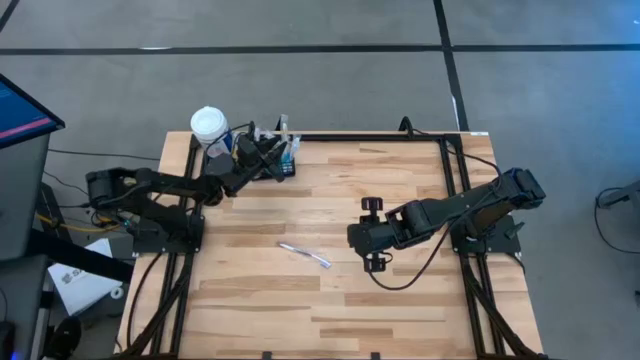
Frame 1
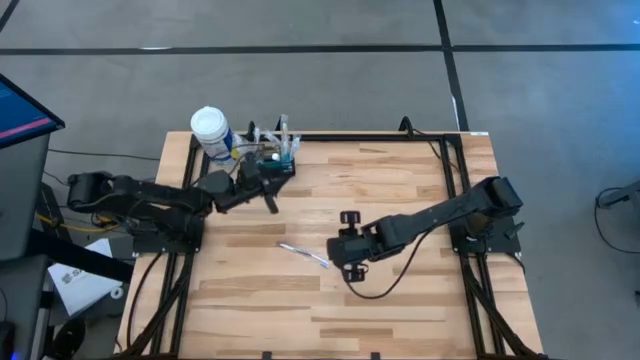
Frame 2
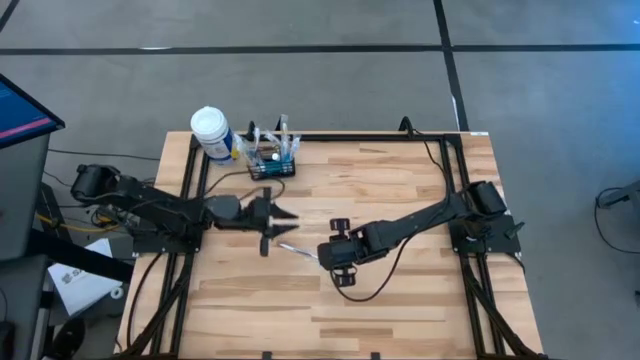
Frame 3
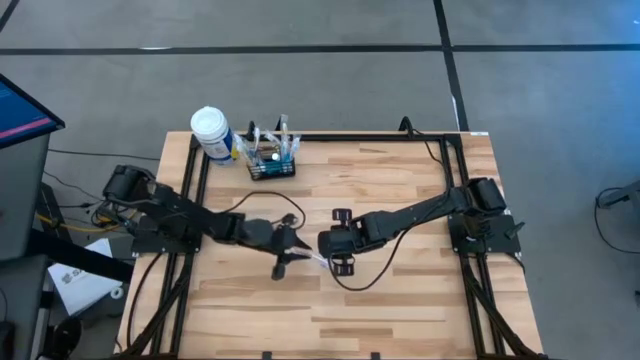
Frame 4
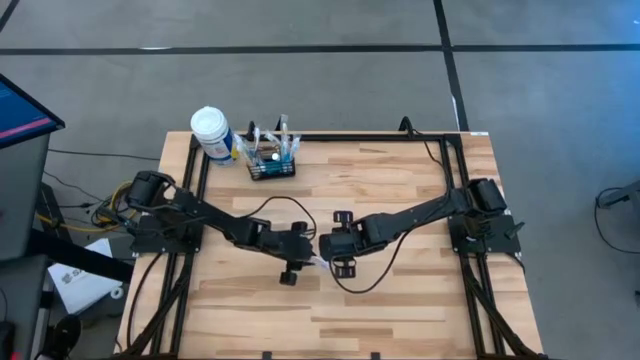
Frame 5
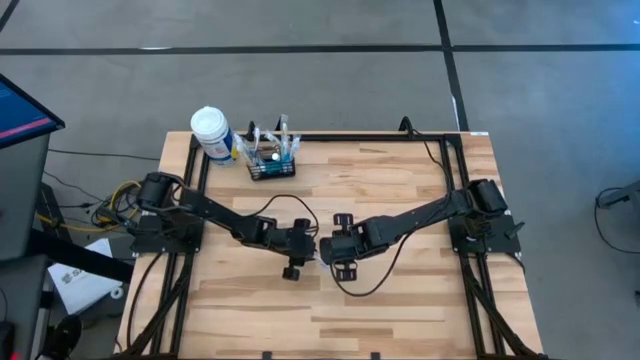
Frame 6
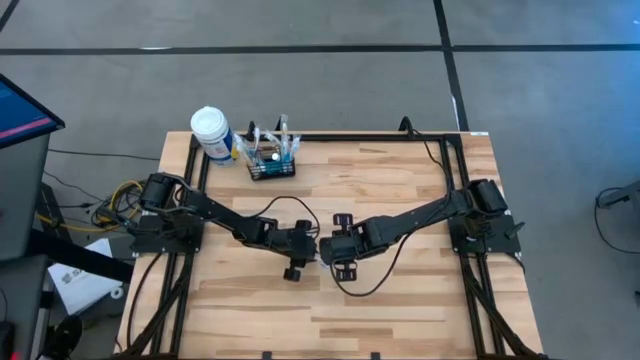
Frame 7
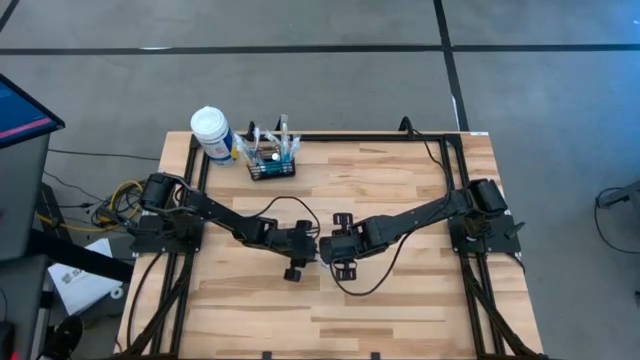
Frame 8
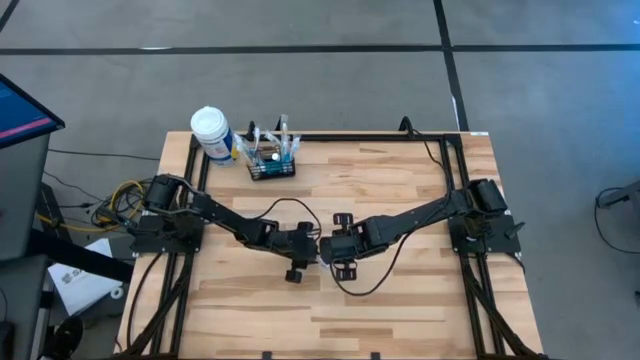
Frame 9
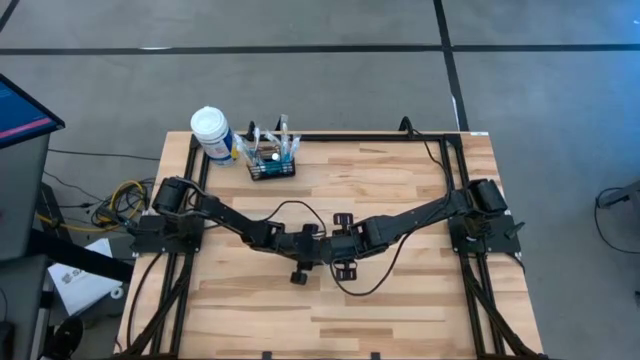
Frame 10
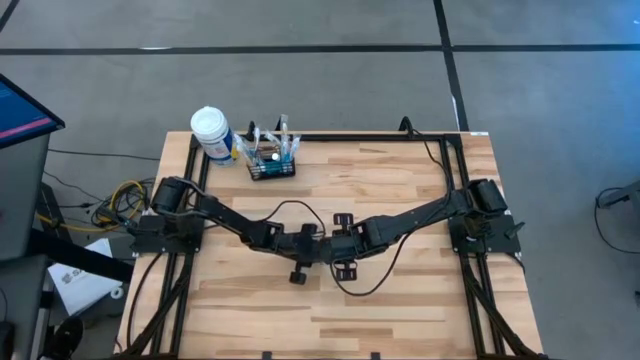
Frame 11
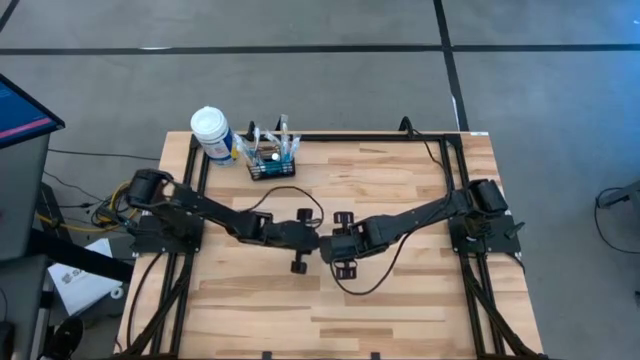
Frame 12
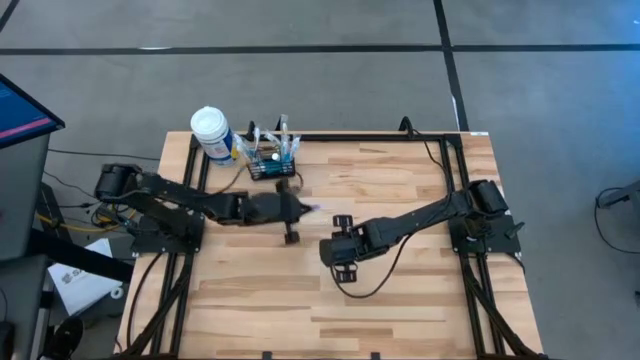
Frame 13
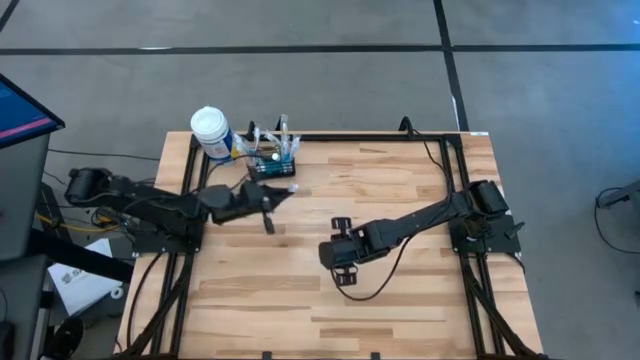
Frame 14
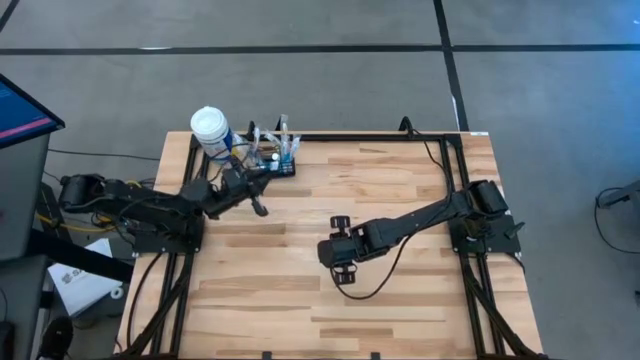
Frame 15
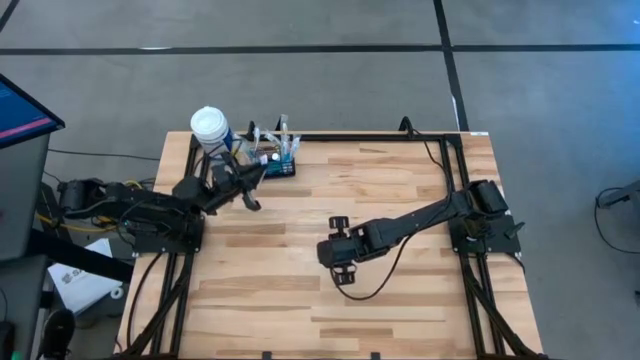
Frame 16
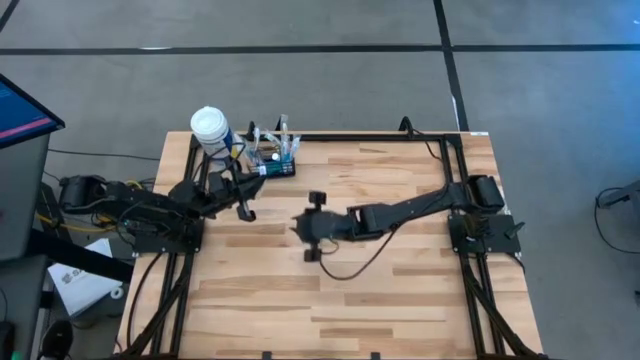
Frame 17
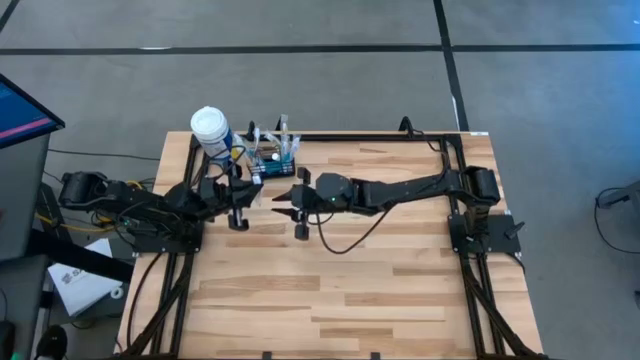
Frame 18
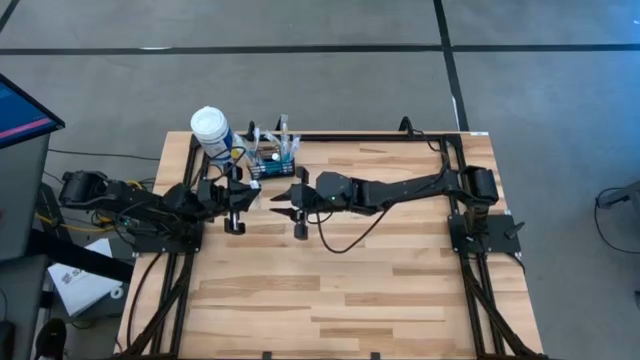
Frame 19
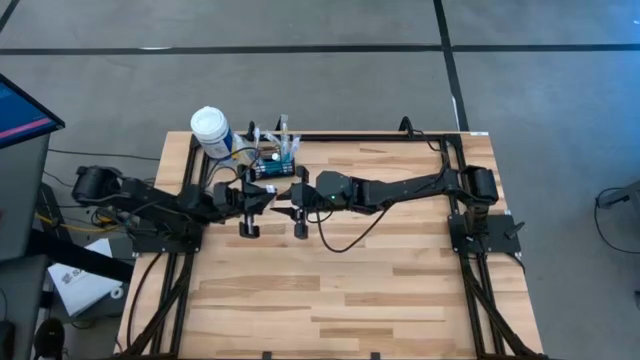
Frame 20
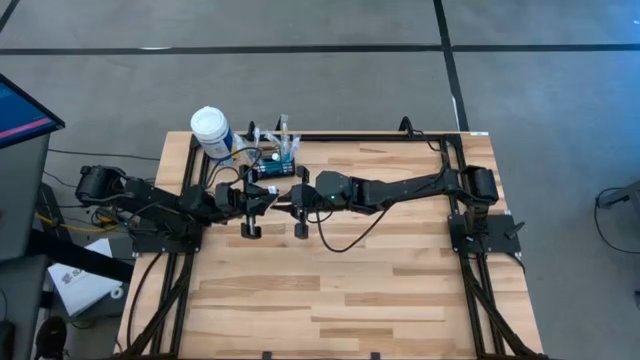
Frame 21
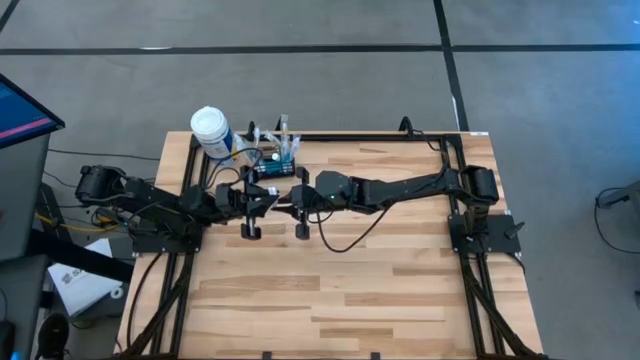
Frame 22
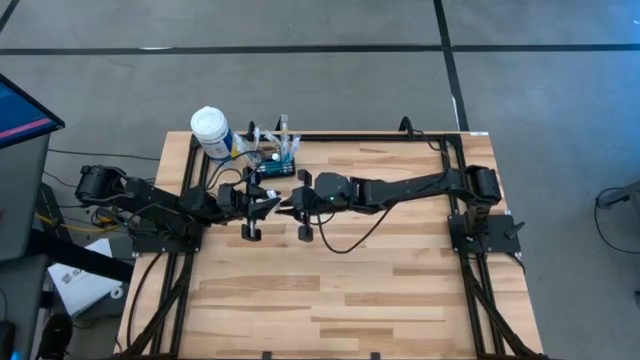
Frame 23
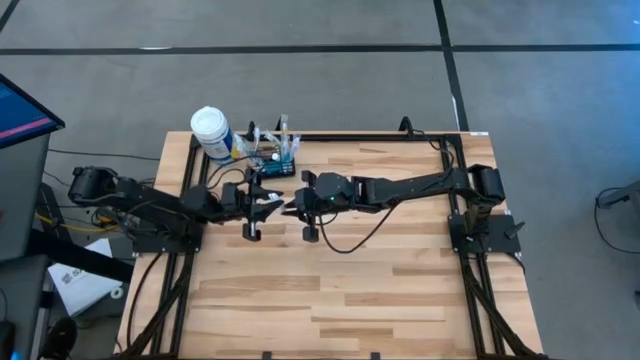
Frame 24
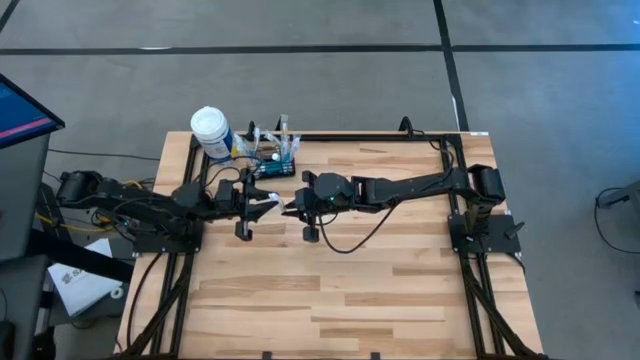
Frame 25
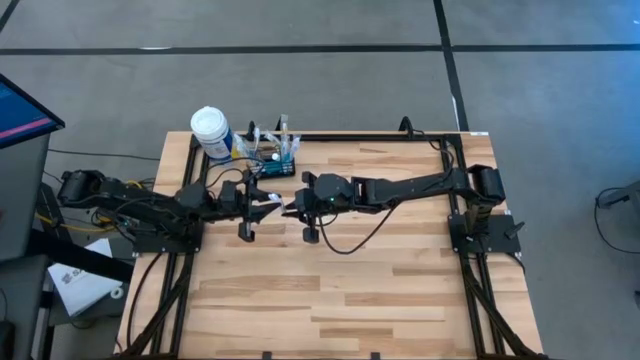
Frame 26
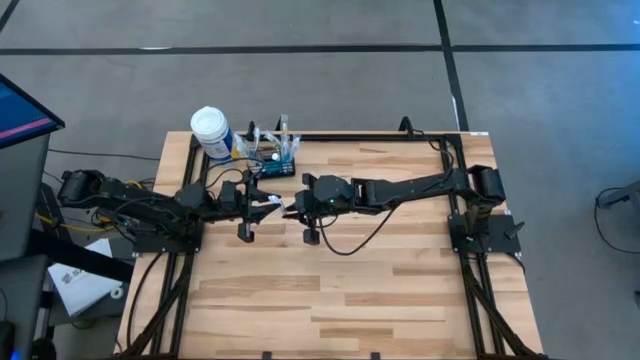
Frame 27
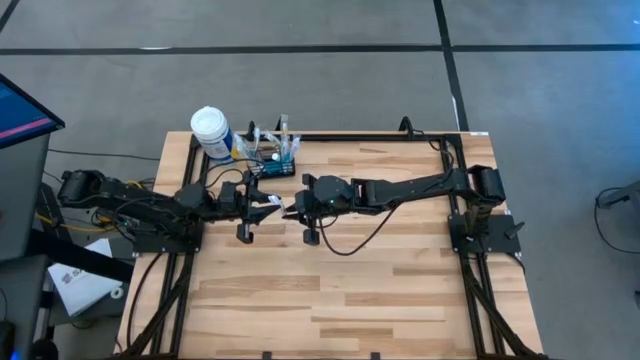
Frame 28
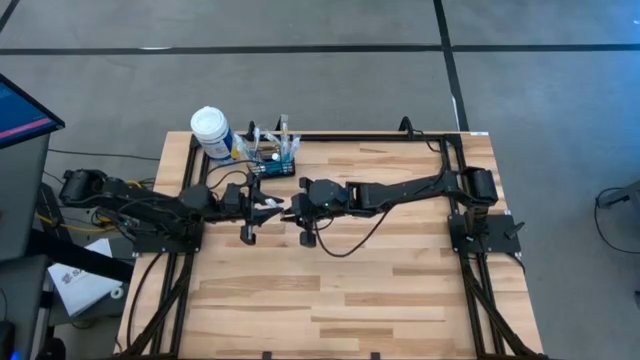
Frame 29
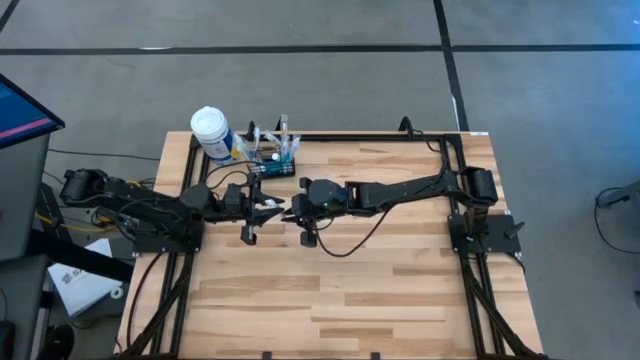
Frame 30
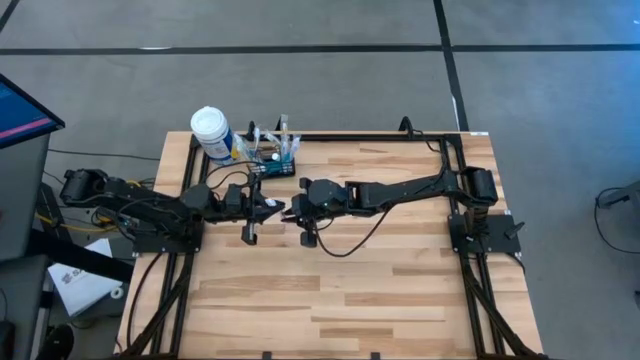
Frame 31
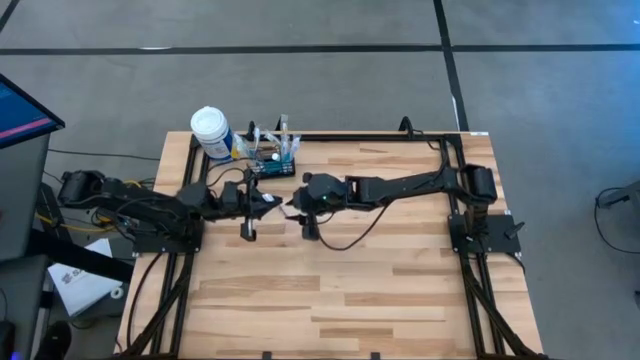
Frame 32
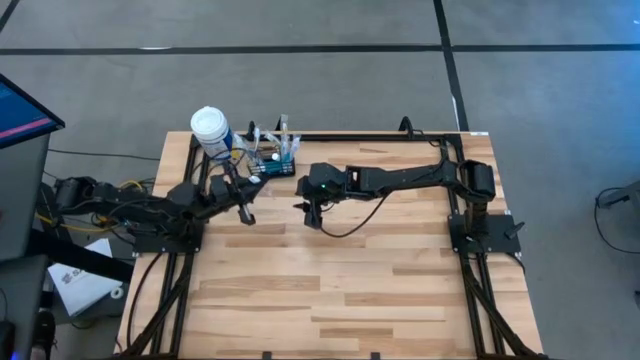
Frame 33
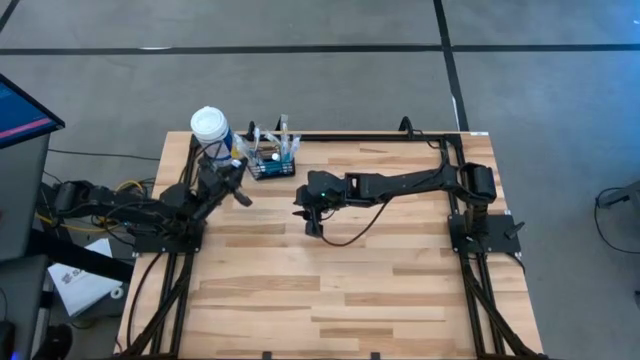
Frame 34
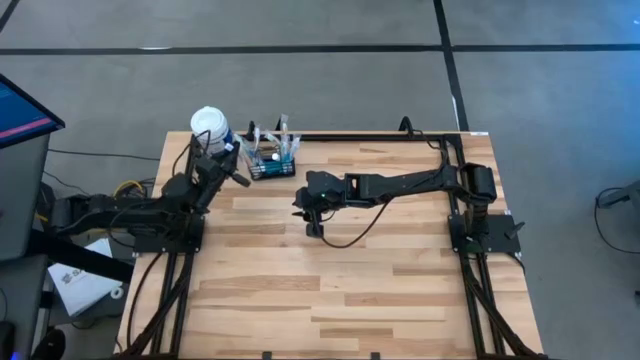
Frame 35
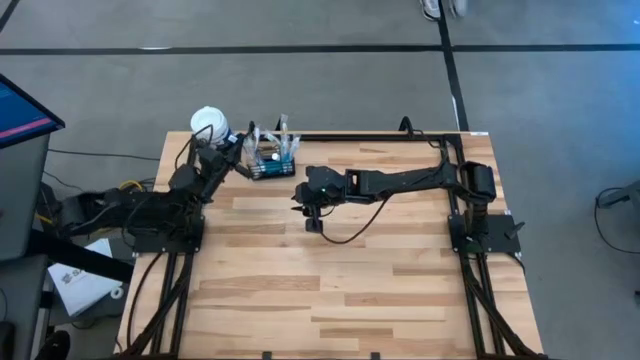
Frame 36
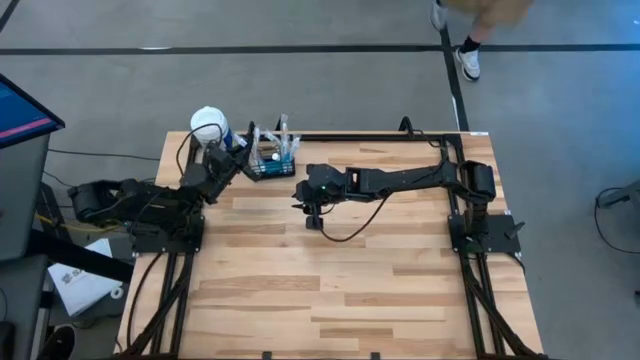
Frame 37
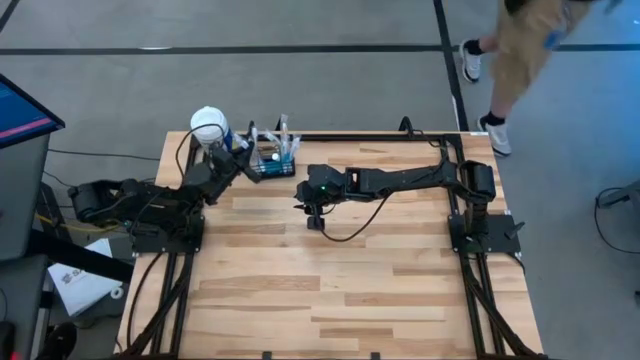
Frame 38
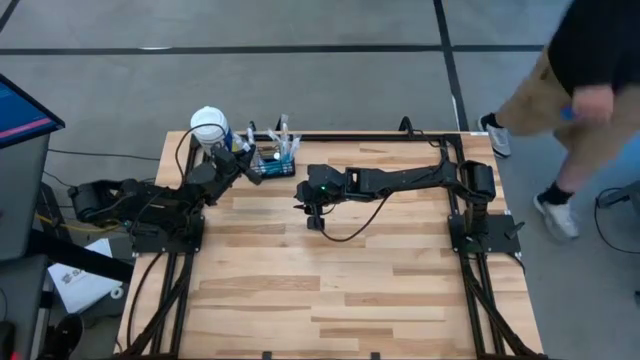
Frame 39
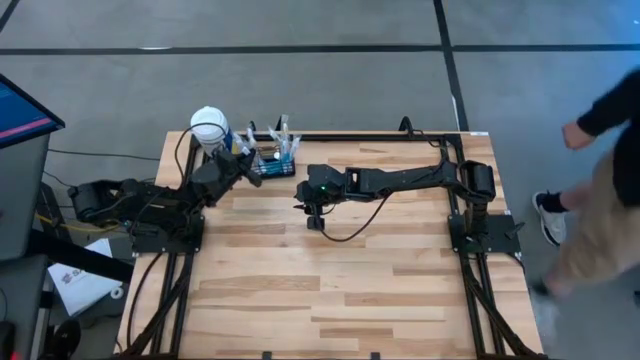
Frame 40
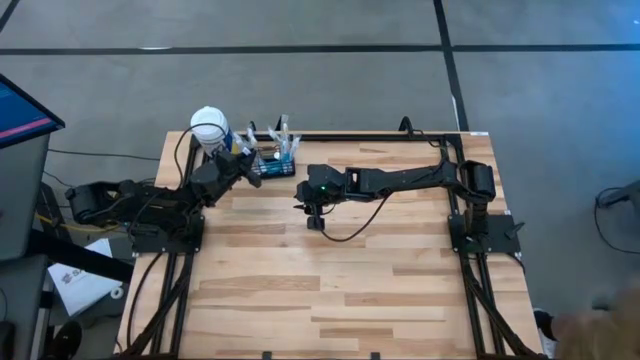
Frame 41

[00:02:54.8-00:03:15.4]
Task: Pick & Place toothbrushing station
Put the purple toothbrush into the black wire organizer

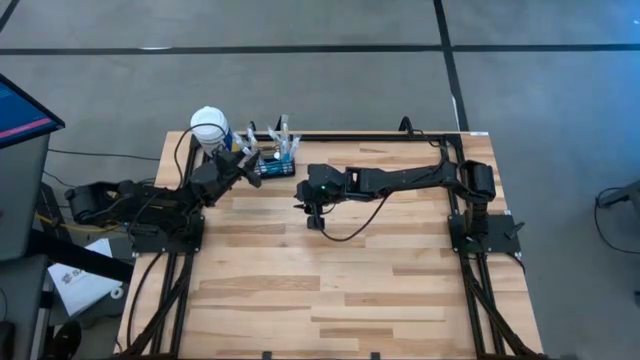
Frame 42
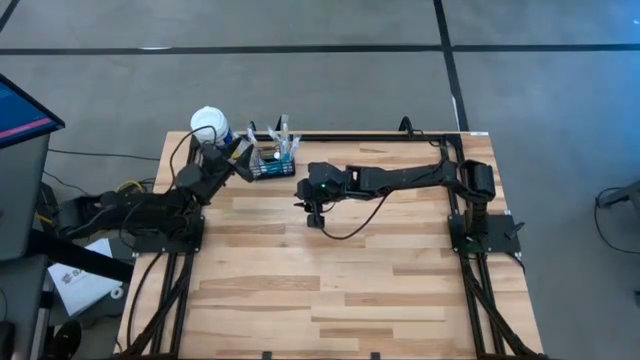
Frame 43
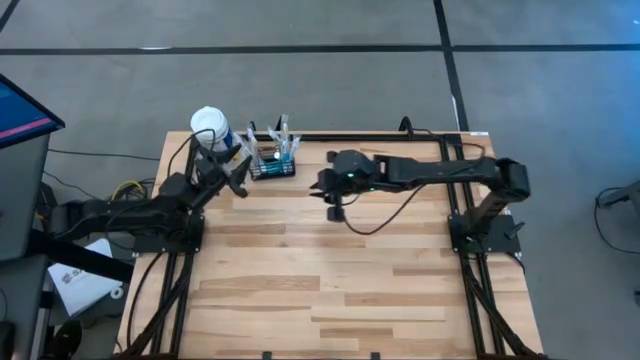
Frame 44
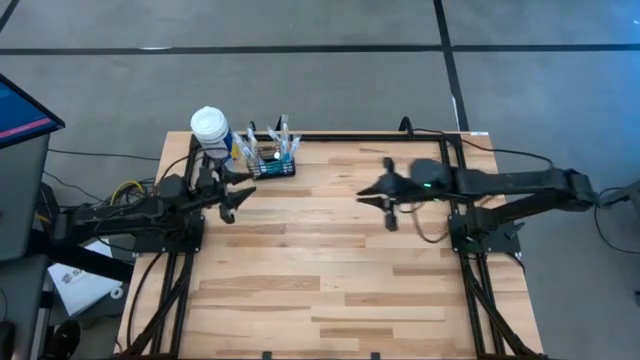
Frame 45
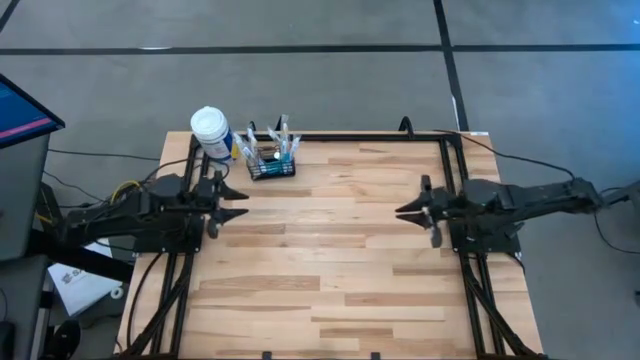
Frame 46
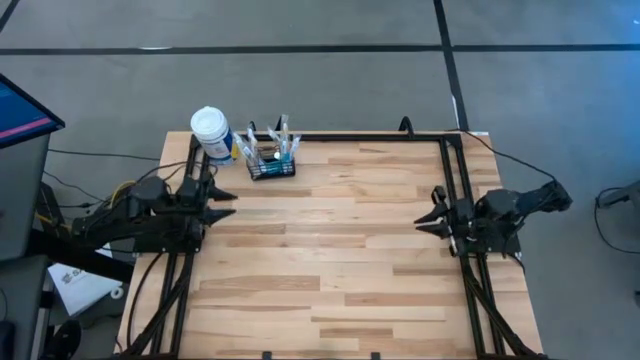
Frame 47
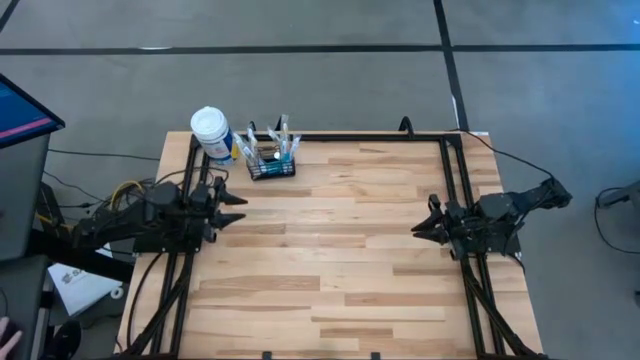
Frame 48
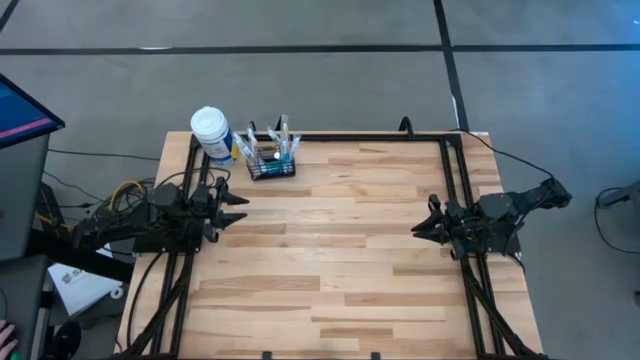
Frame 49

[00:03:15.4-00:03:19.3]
Return to Home Position
